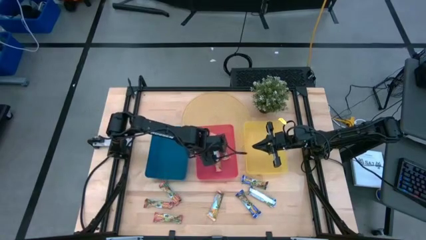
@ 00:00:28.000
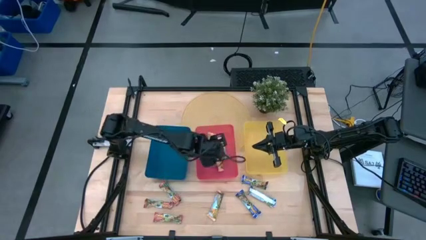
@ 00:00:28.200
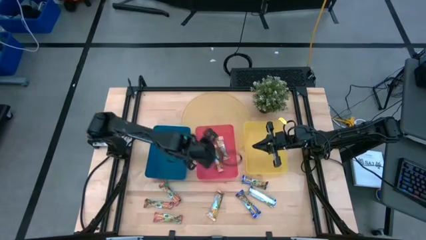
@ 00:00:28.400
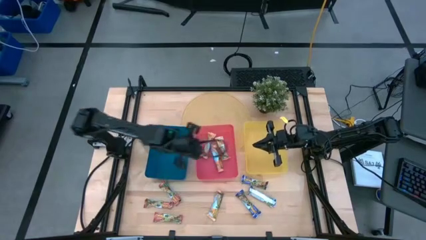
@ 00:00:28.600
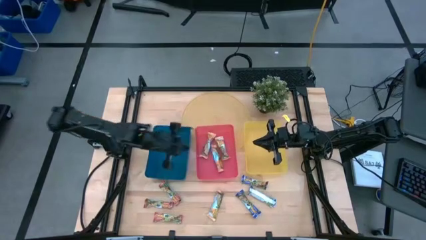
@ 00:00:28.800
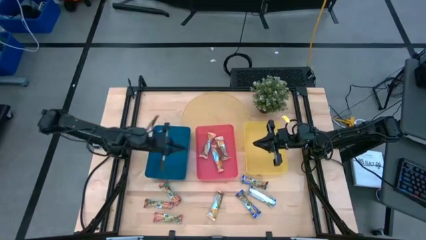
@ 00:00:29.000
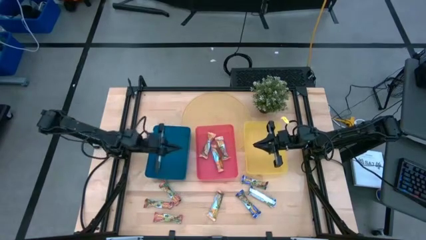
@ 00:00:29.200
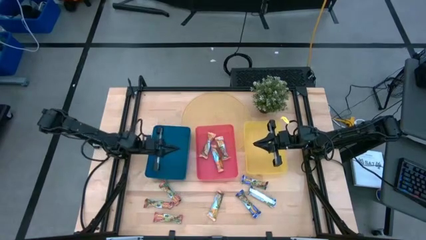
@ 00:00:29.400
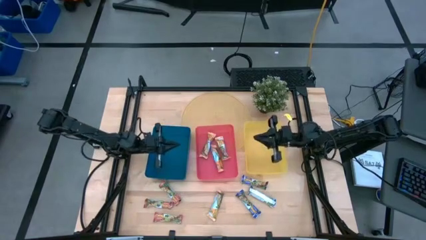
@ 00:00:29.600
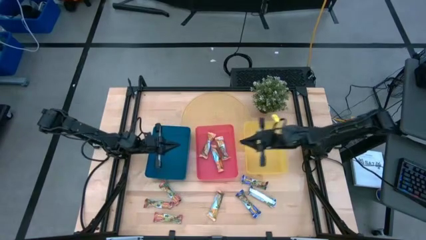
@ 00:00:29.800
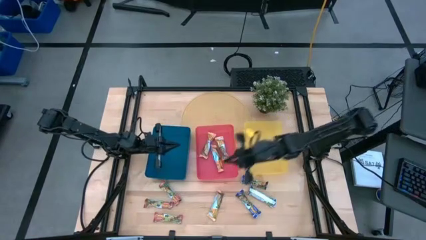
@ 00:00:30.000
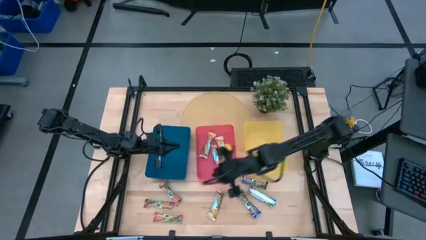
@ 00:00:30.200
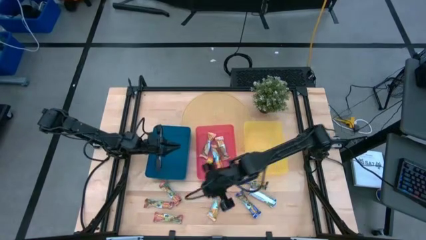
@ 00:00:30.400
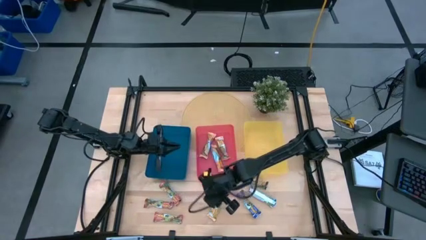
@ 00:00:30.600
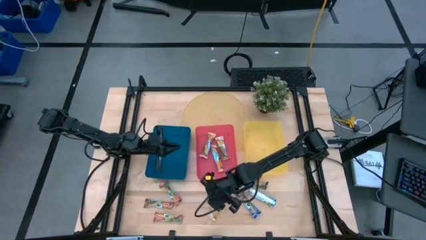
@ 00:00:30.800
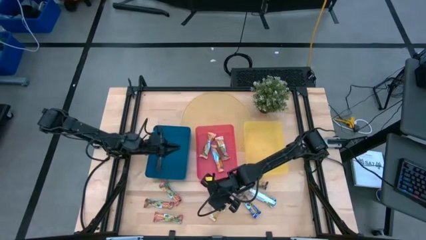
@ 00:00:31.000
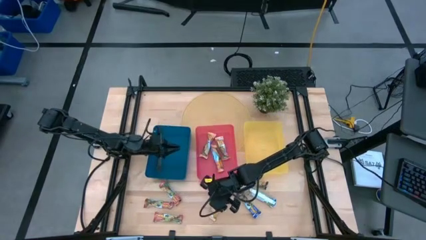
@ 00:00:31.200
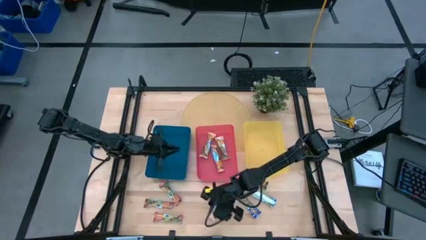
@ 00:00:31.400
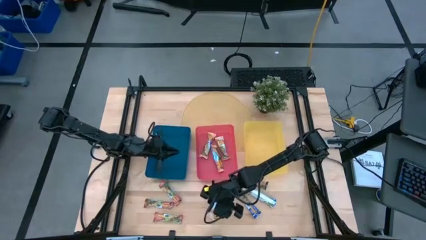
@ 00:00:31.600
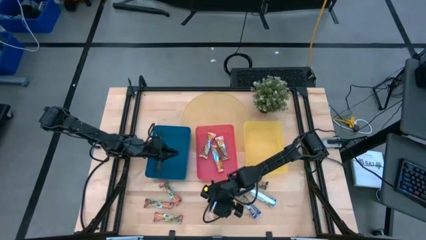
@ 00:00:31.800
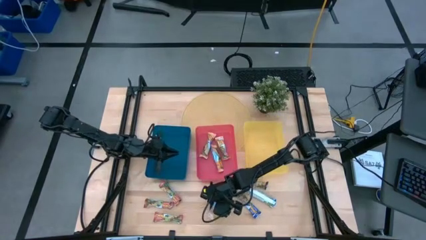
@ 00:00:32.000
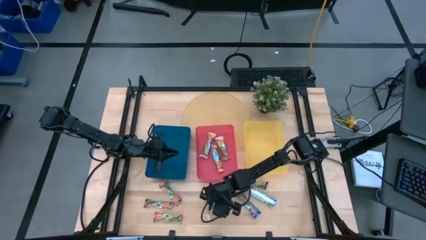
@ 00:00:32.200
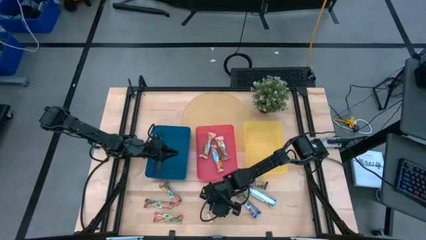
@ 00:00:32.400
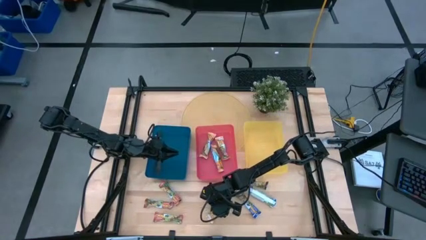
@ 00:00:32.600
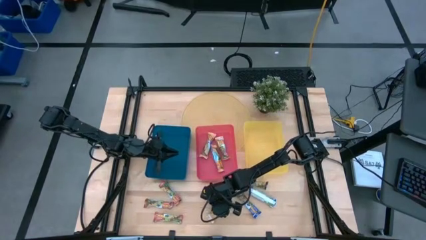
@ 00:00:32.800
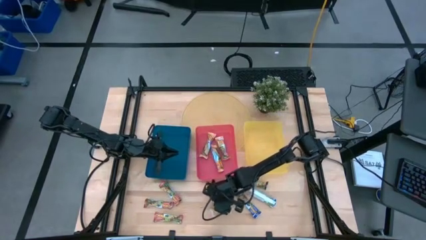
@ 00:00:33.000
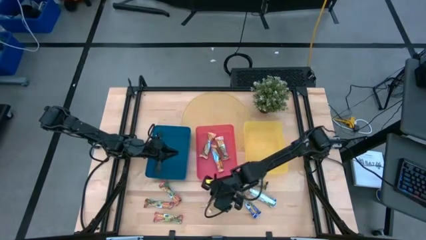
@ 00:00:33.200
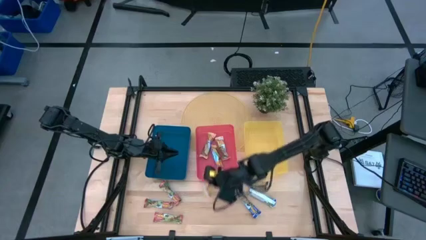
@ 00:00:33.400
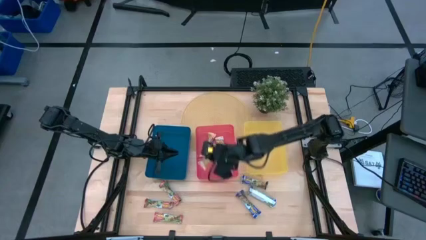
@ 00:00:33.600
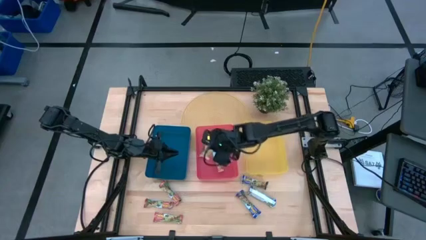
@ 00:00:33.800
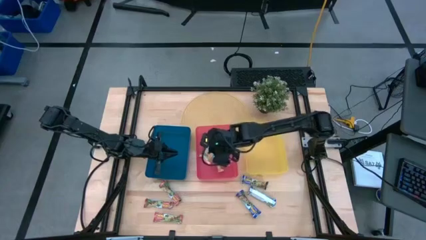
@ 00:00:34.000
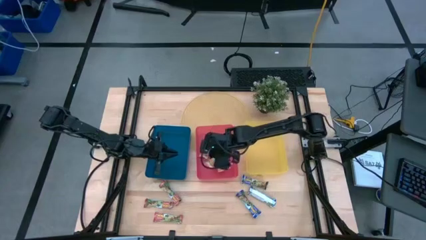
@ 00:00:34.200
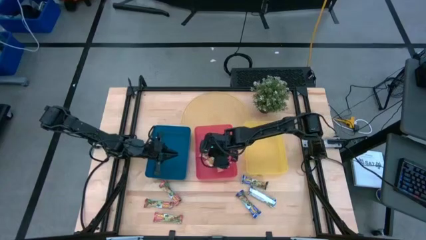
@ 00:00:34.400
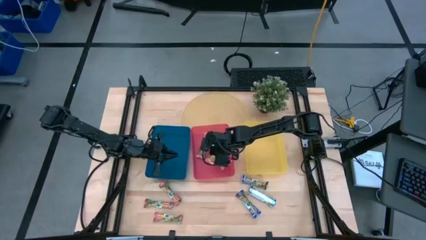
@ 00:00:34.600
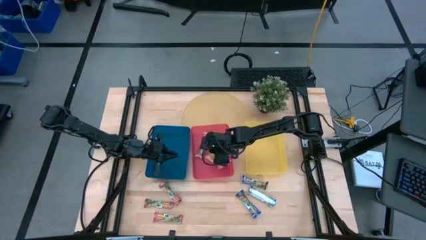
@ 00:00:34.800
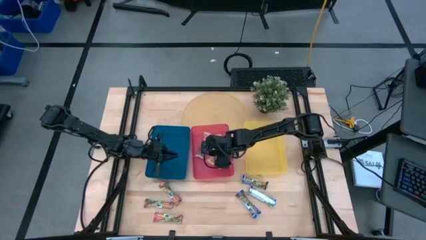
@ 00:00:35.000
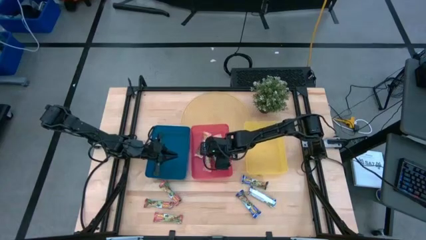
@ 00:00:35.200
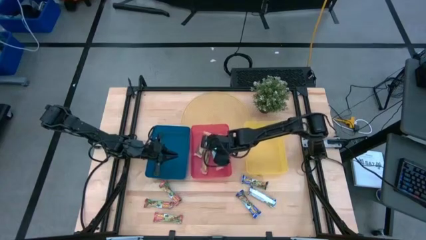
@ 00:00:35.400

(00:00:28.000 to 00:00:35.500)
Task: Pick and place Granola Bars by type
Put the orange granola bar into the red bin

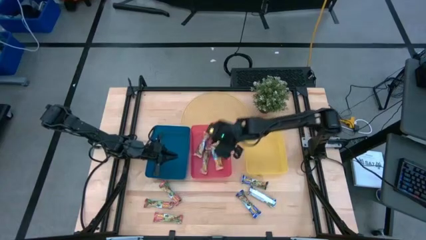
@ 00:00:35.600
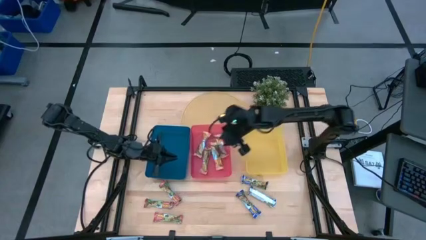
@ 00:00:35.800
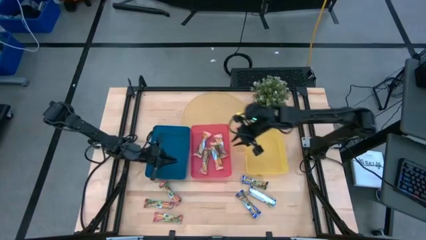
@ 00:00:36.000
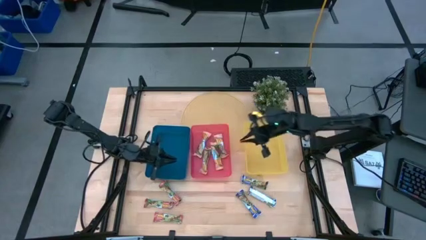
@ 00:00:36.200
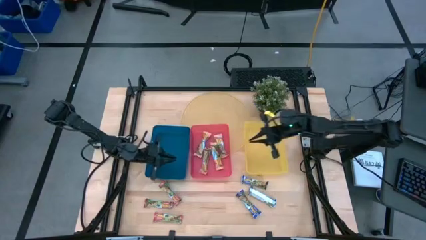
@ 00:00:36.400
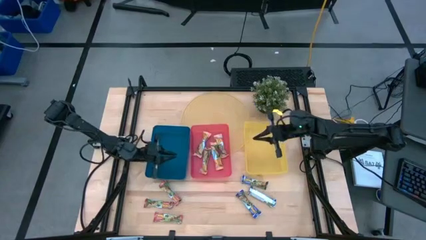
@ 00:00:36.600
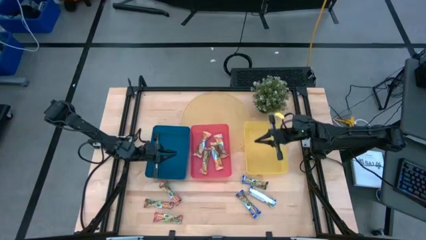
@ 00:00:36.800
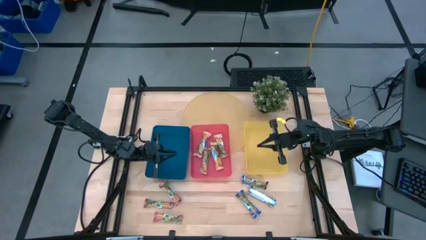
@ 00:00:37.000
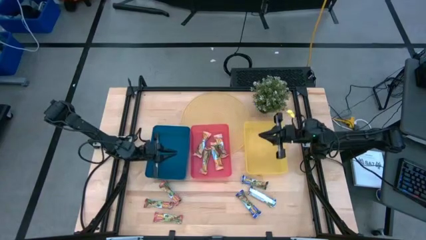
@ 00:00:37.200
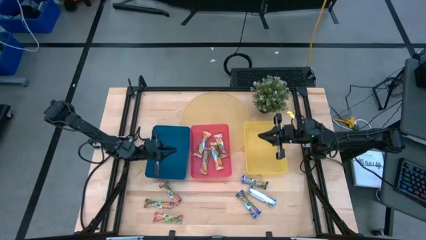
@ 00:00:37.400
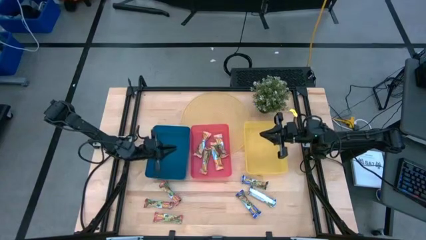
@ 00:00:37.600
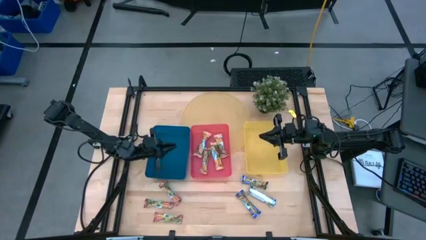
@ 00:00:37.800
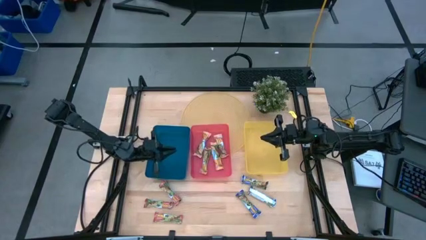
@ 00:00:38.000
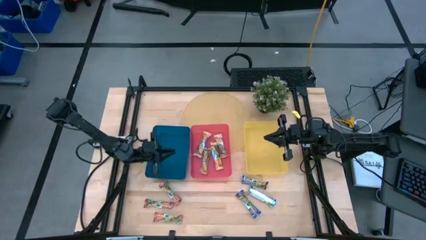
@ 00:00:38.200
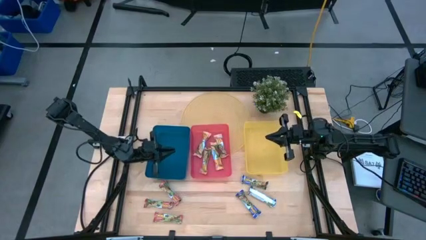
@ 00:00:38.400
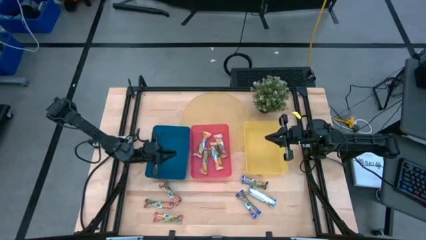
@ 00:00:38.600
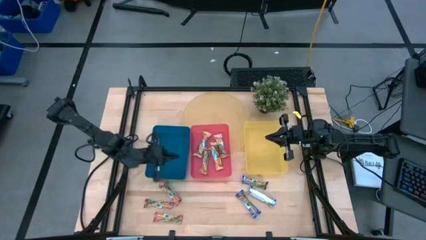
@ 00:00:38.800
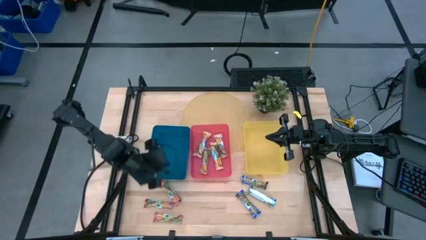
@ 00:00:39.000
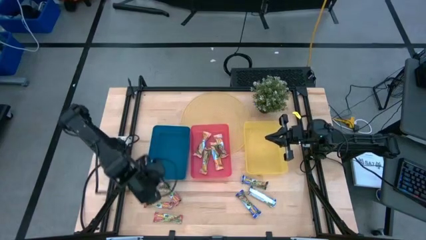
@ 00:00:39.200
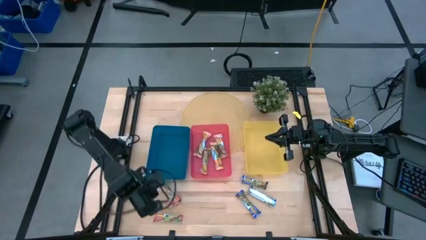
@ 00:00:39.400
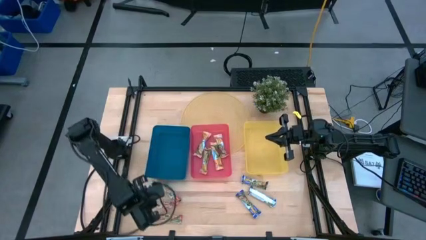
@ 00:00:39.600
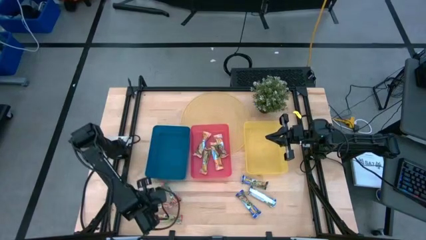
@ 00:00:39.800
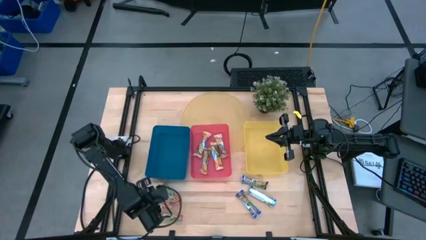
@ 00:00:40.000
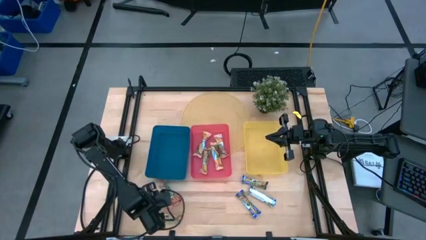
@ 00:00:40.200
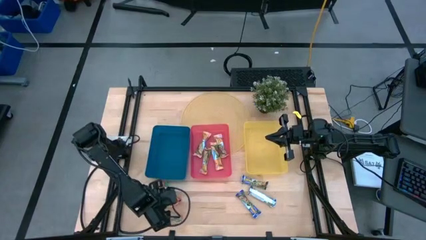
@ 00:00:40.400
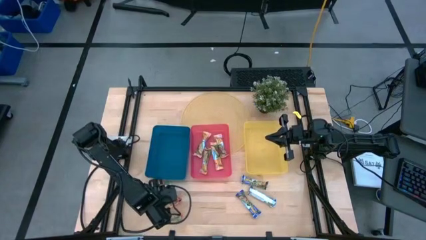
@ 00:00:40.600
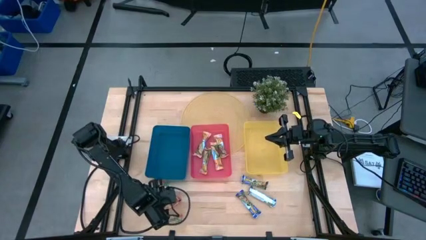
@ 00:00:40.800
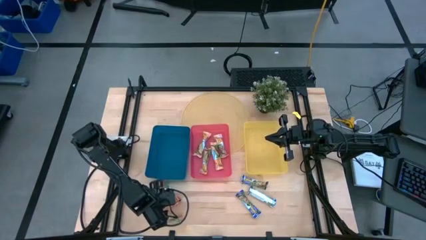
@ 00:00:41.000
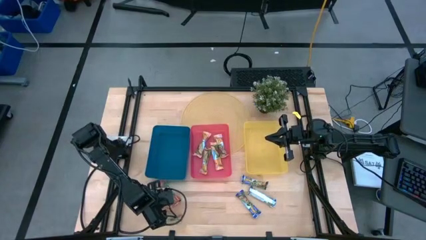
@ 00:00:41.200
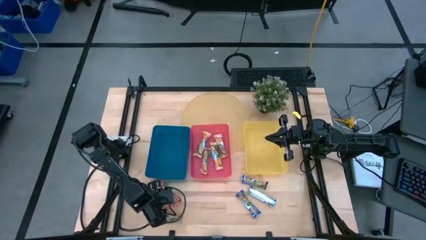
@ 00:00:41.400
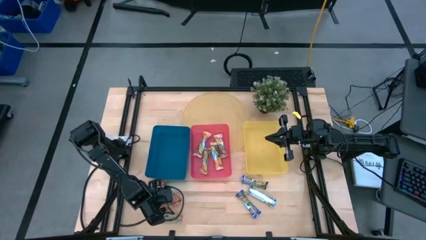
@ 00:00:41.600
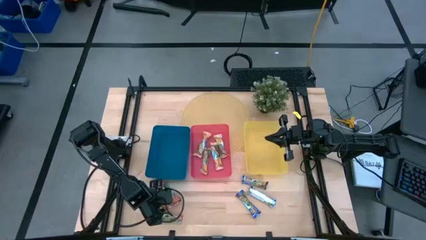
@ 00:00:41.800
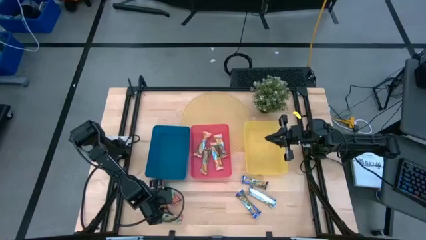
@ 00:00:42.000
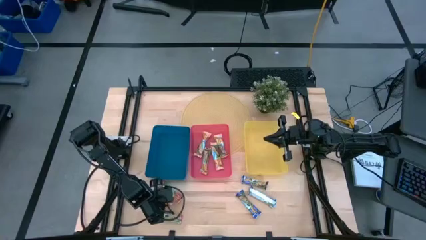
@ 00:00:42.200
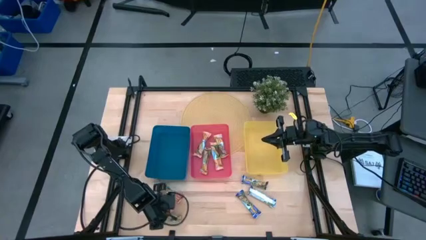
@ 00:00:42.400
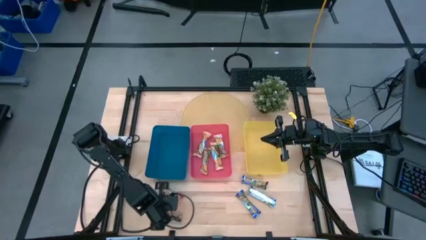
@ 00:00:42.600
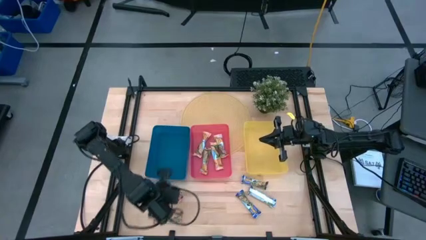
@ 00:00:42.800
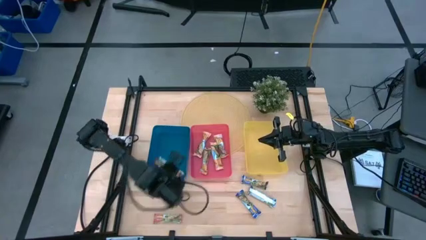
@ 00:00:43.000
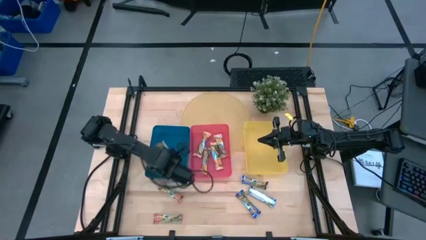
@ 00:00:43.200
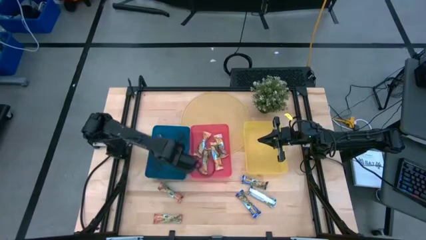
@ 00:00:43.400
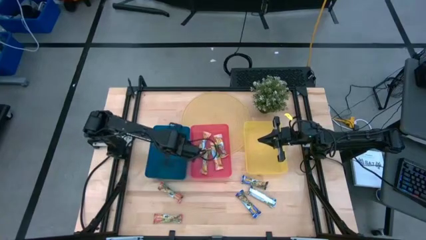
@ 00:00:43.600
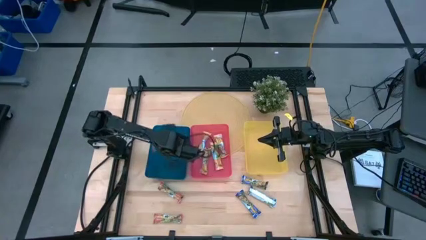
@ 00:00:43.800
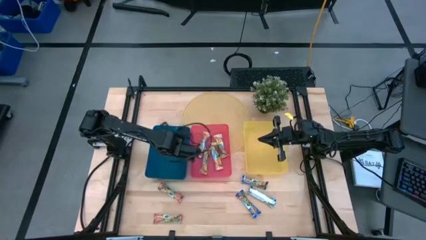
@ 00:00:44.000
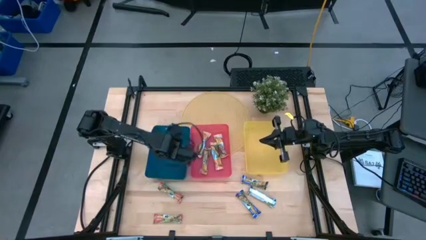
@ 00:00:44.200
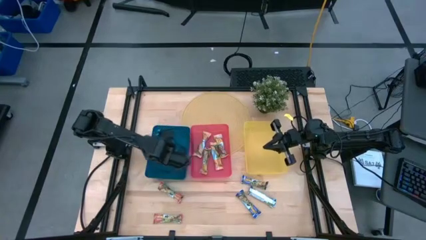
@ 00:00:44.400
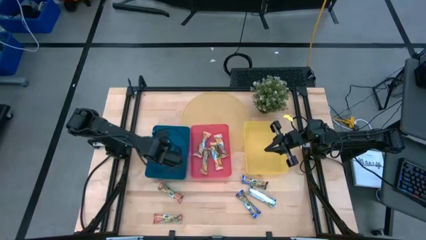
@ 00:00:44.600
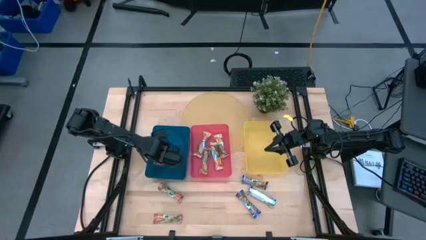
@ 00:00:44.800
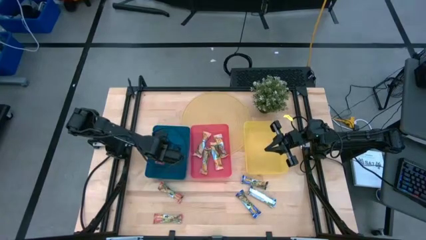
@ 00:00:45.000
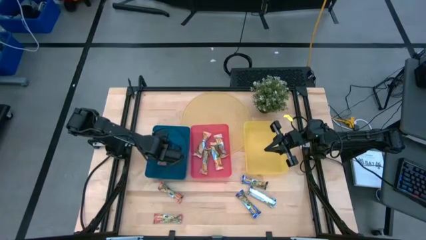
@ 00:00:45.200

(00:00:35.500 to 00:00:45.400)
Put the red granola bar into the blue bin
